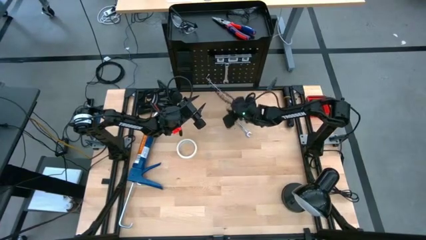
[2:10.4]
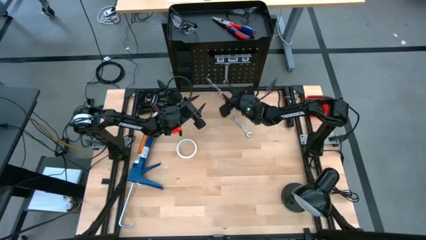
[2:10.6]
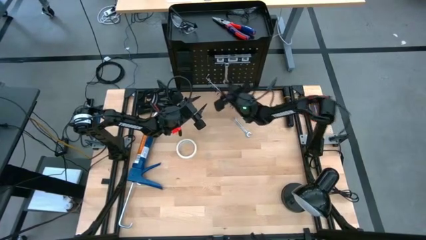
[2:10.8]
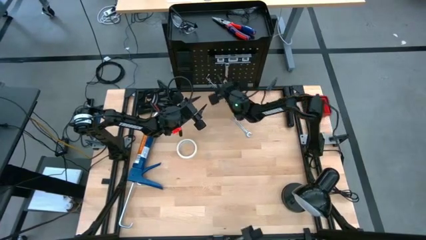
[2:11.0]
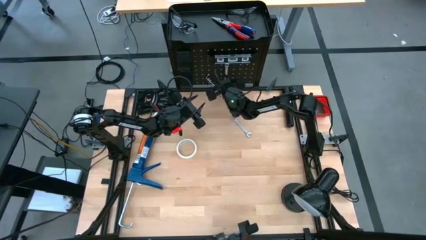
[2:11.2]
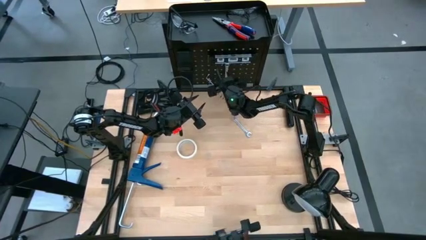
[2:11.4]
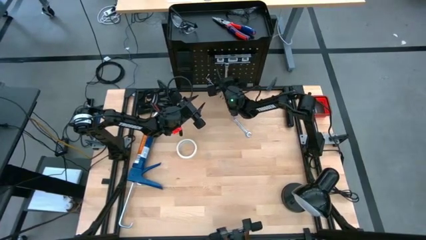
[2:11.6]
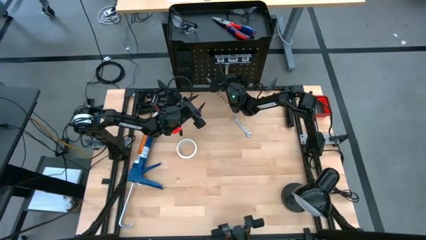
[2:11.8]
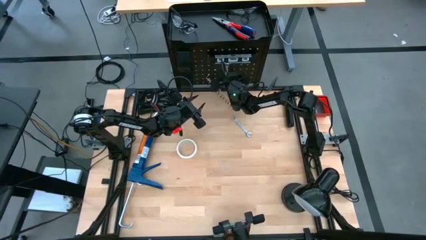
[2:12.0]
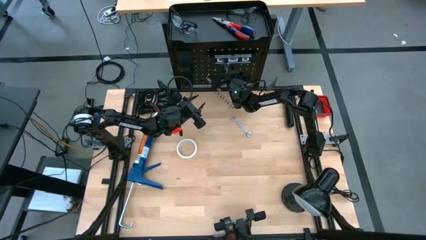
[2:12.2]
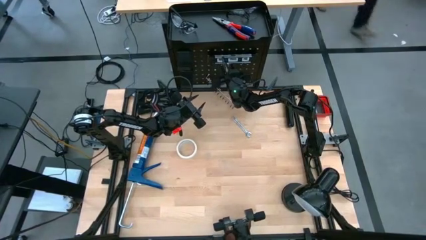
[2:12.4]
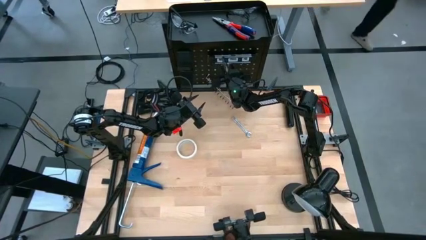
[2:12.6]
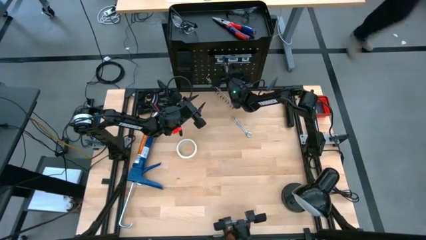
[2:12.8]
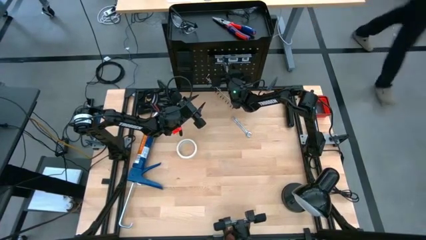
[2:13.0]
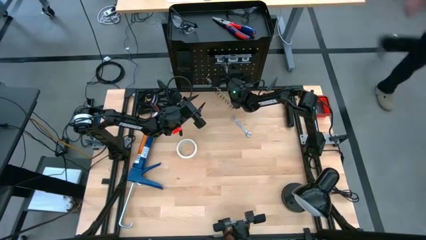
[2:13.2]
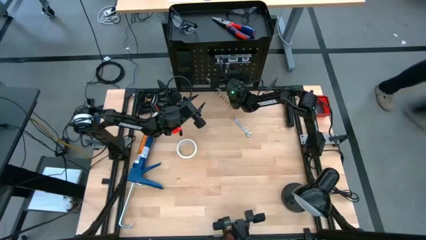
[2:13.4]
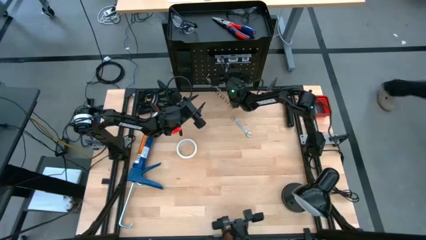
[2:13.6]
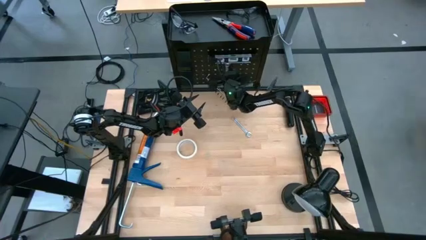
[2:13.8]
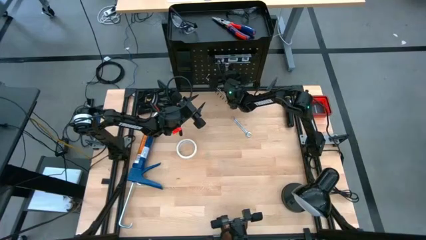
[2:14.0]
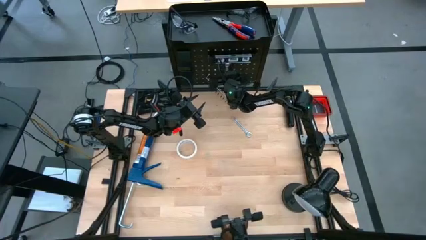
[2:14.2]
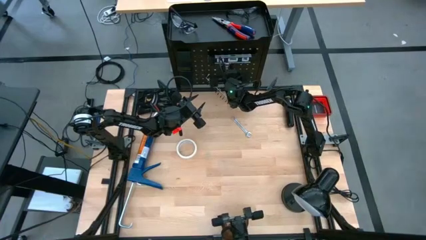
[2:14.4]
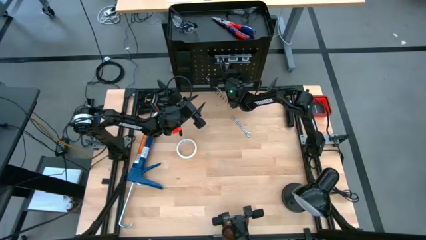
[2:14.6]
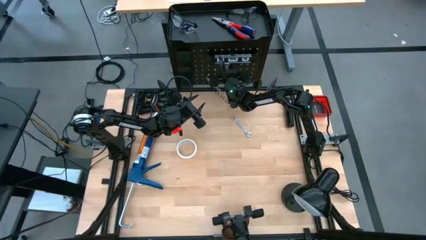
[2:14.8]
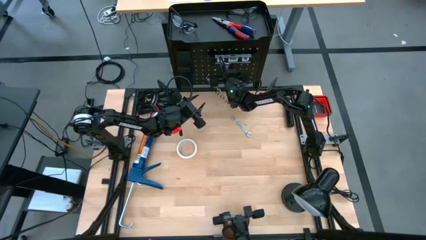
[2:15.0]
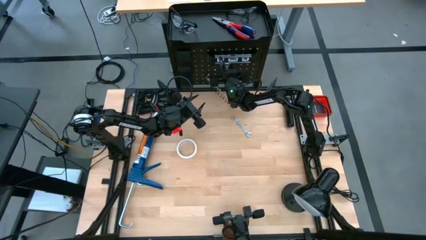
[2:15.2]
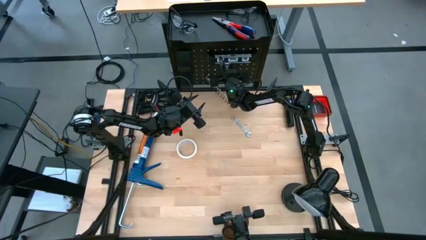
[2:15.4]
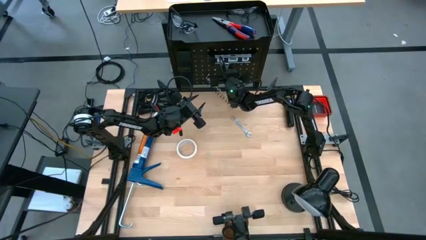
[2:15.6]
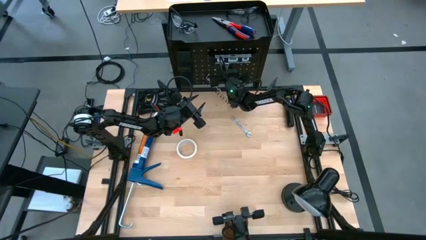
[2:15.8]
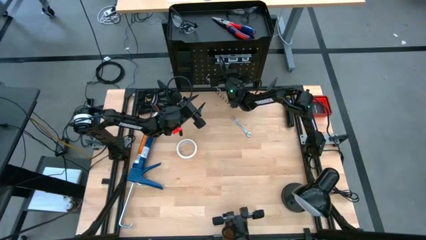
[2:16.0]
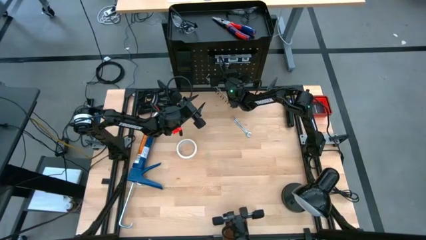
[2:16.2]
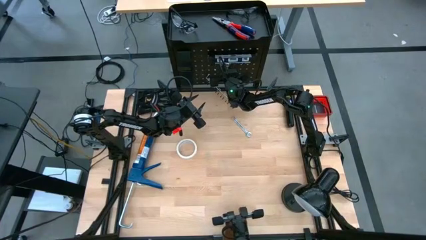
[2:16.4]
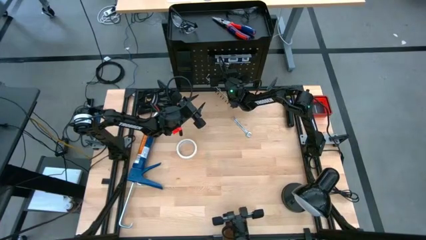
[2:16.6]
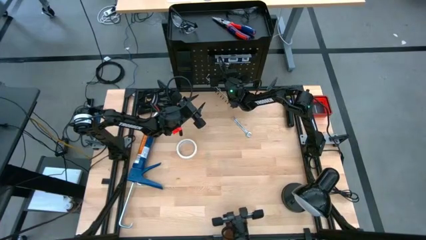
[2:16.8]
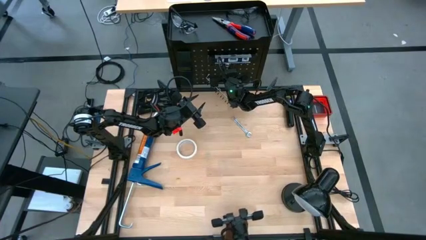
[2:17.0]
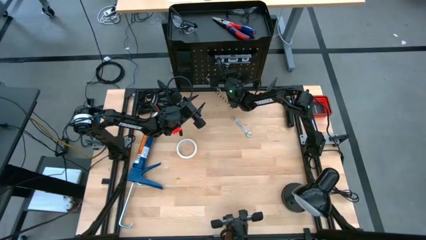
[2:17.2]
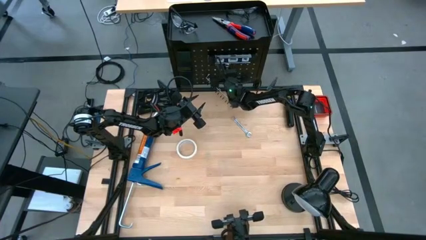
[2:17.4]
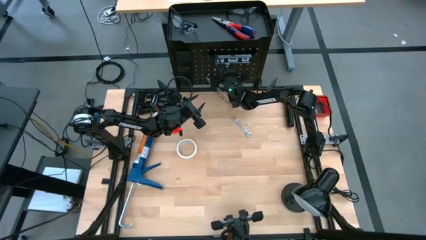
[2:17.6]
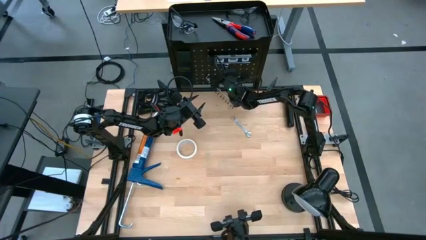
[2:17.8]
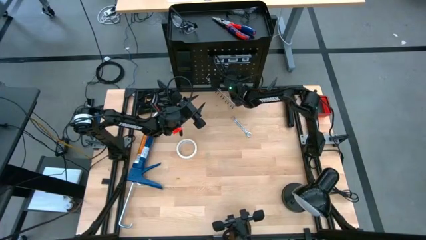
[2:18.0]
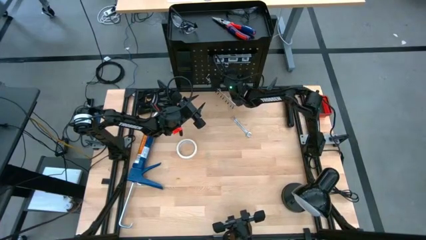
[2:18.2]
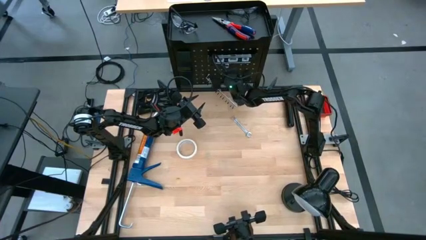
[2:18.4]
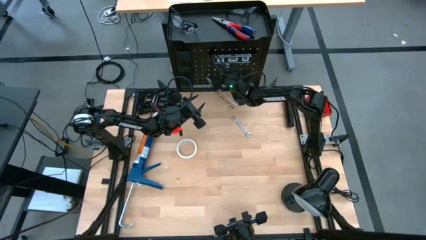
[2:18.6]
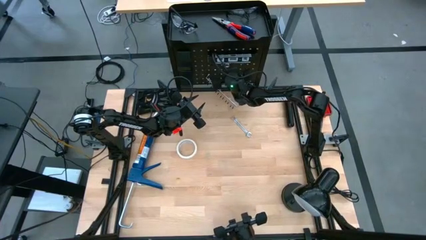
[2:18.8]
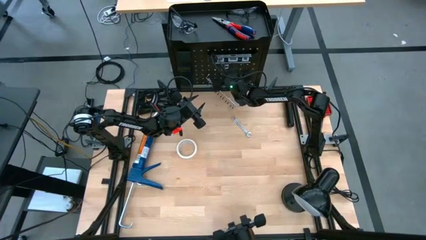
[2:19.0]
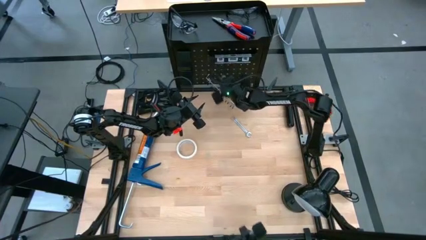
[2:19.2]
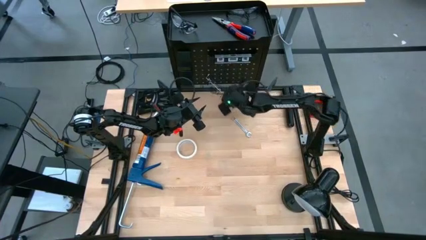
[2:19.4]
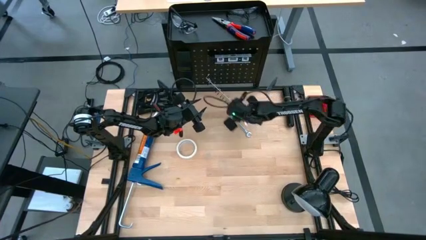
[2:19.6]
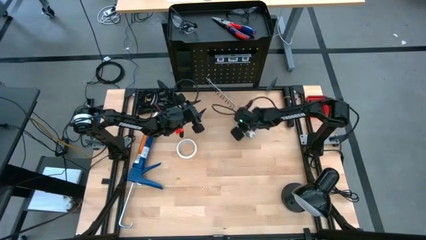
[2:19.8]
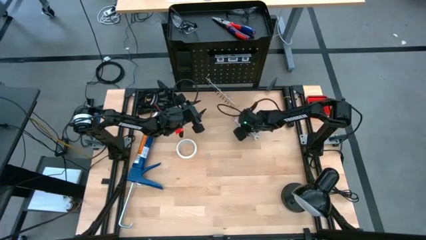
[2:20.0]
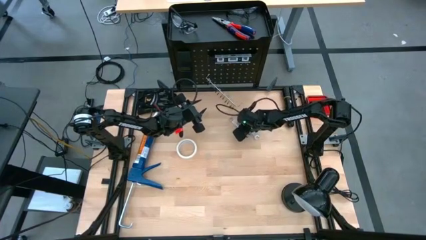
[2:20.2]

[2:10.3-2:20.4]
Task: Hang tools onto peg board
Unhang the wrench from the peg board

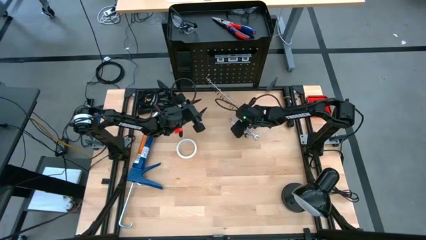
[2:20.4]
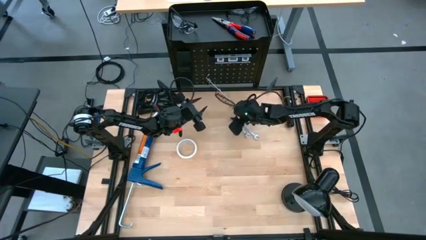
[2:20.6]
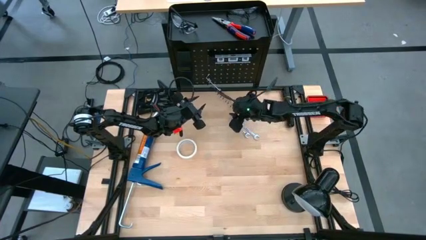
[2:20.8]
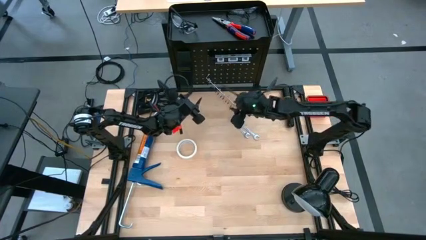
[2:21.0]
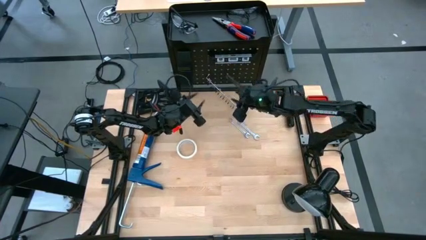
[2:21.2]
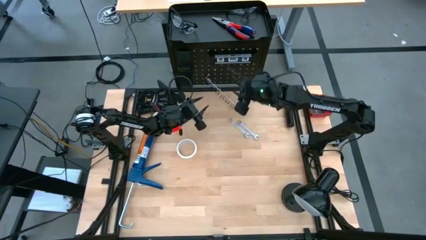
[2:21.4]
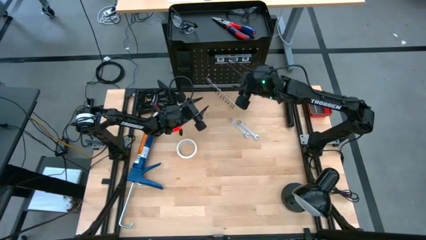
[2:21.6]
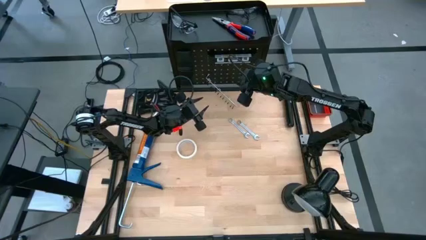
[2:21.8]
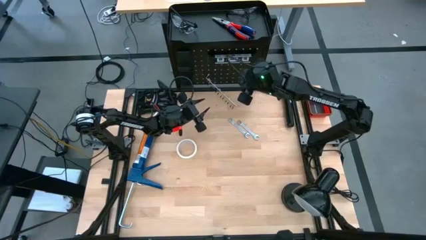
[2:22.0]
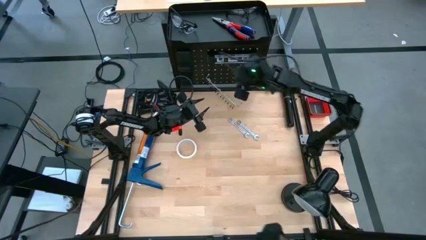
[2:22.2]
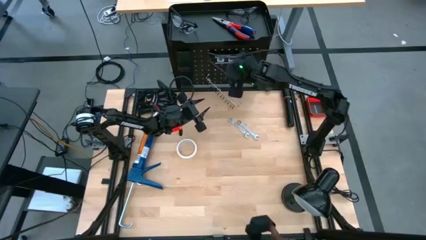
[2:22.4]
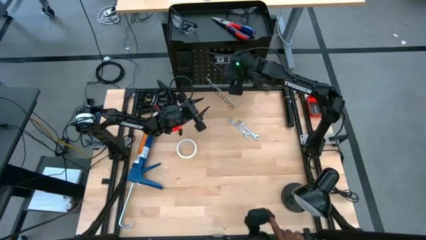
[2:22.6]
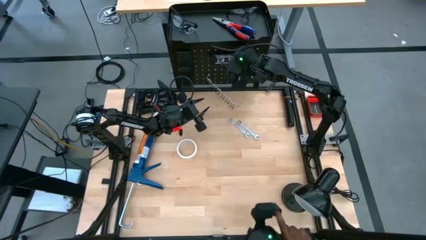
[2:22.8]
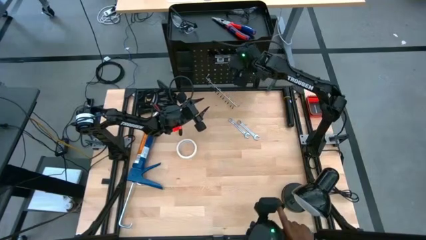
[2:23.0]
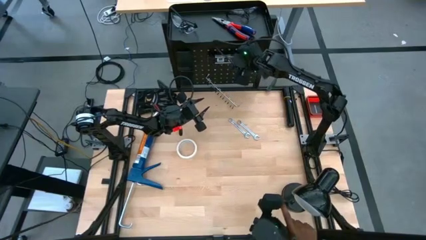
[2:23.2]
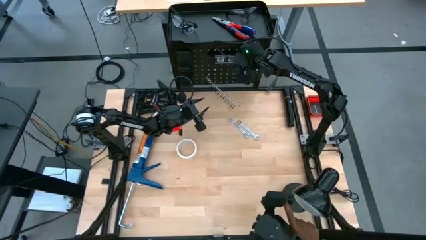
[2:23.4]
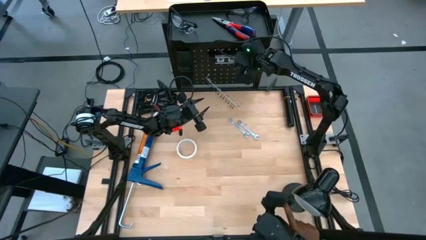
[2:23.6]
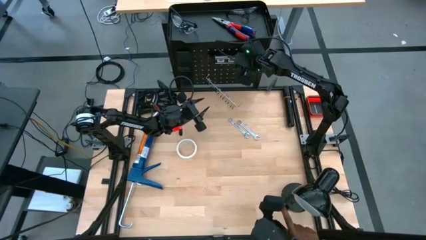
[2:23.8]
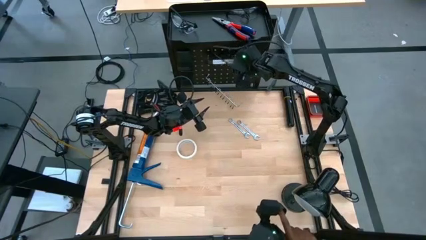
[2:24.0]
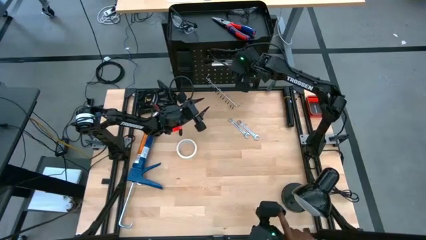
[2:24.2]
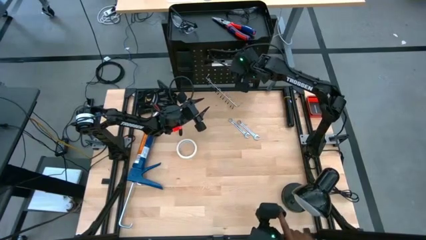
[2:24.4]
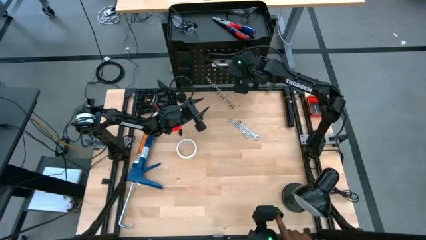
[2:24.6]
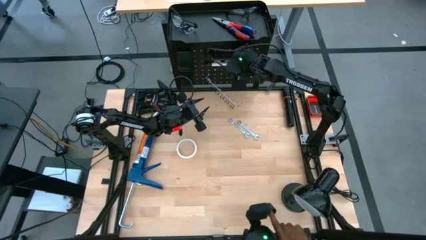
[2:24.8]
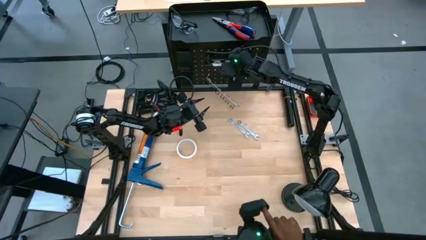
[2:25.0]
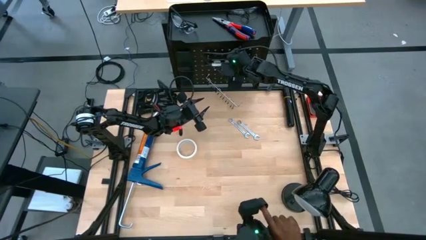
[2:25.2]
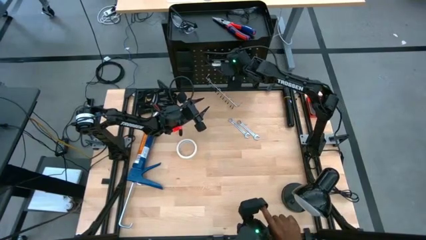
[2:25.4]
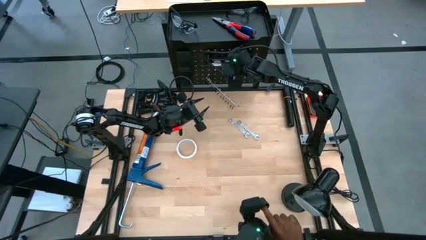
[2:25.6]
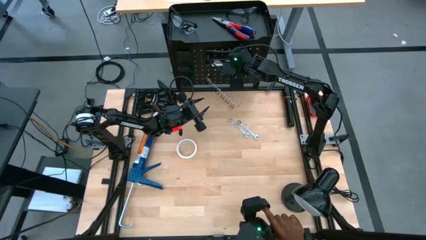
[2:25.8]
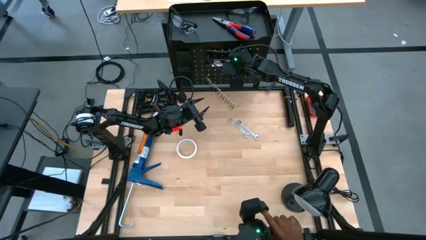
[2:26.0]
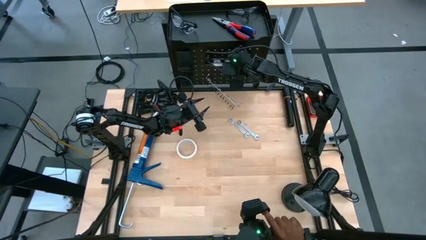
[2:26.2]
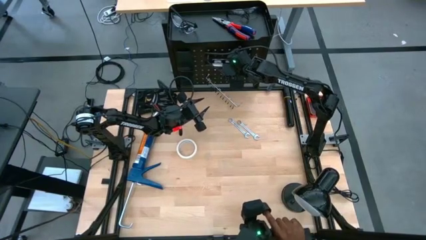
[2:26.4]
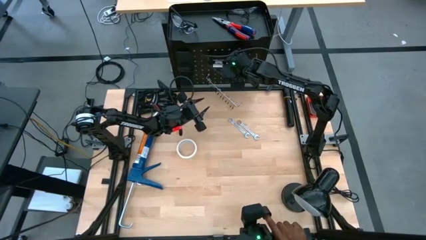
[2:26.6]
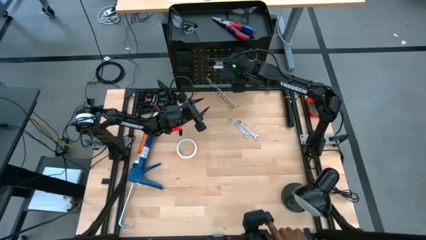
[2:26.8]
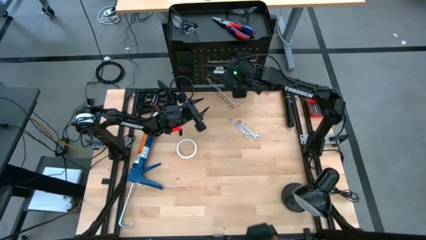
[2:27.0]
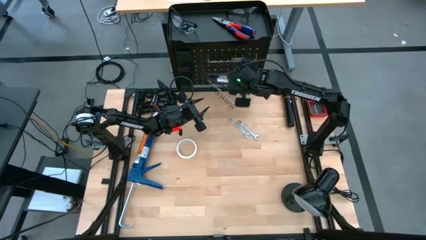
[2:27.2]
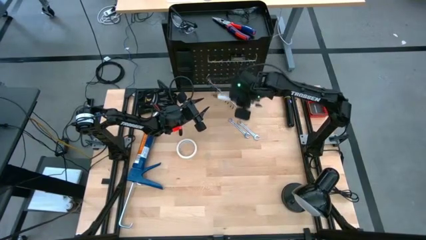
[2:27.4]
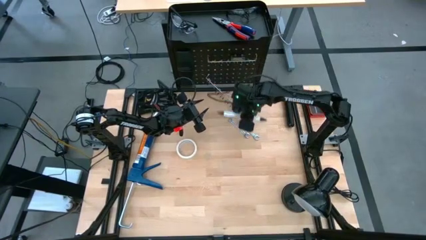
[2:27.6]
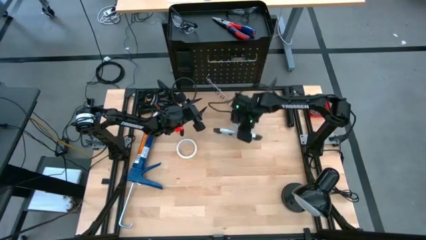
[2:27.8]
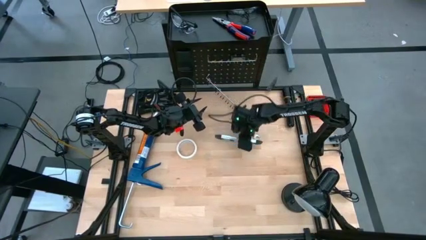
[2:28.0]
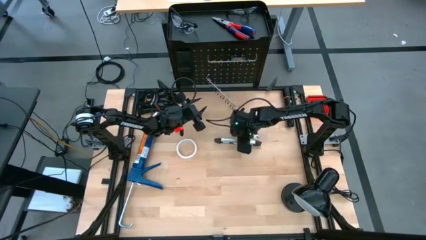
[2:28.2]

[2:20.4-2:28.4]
Unhang the spirit level from the peg board
